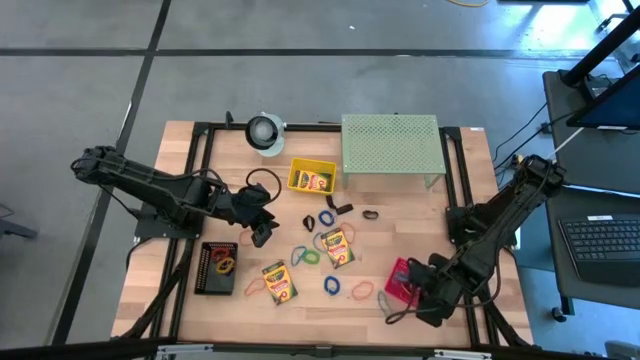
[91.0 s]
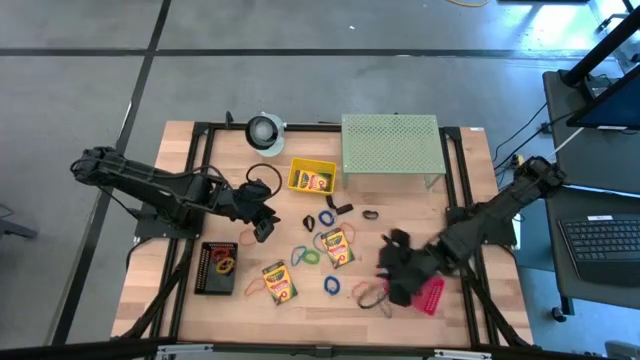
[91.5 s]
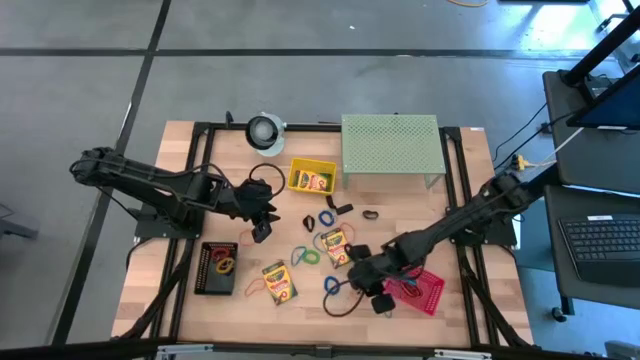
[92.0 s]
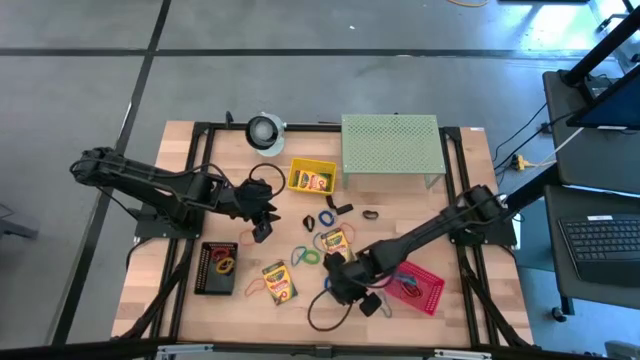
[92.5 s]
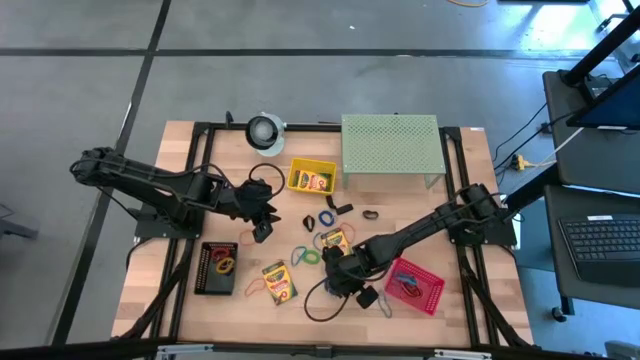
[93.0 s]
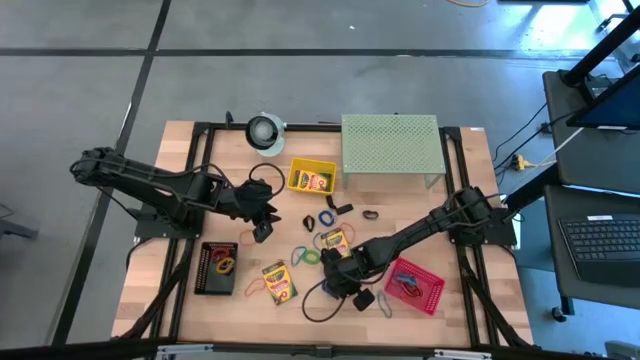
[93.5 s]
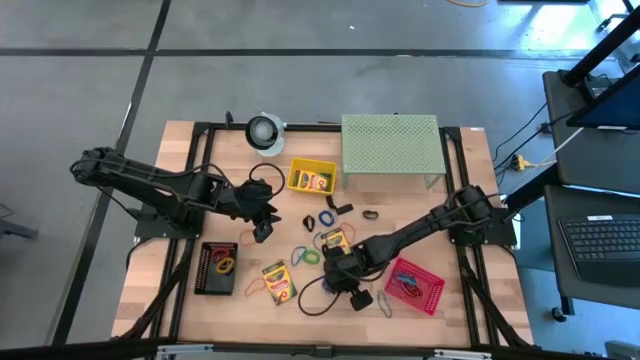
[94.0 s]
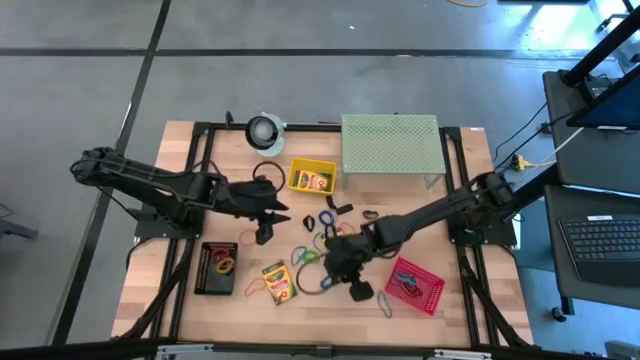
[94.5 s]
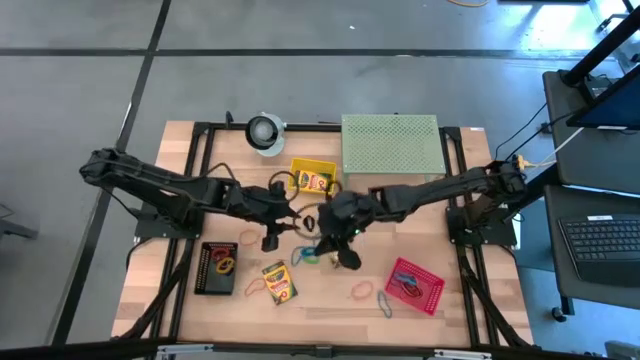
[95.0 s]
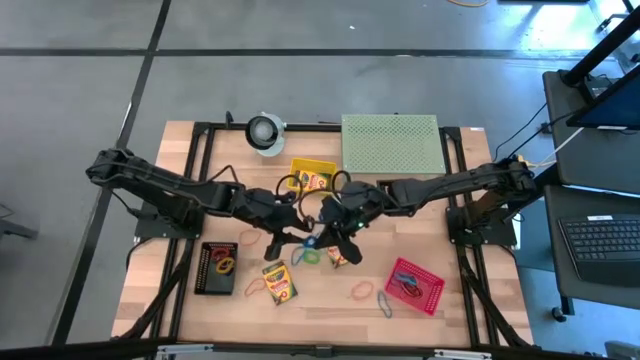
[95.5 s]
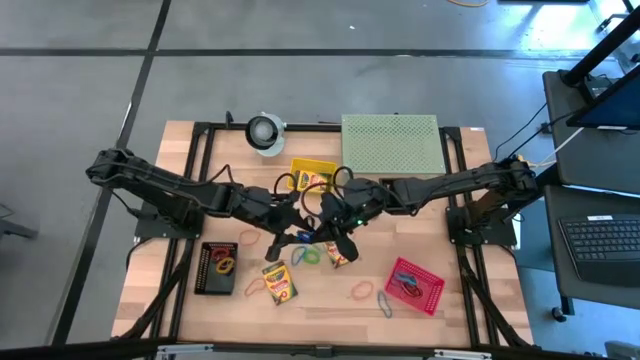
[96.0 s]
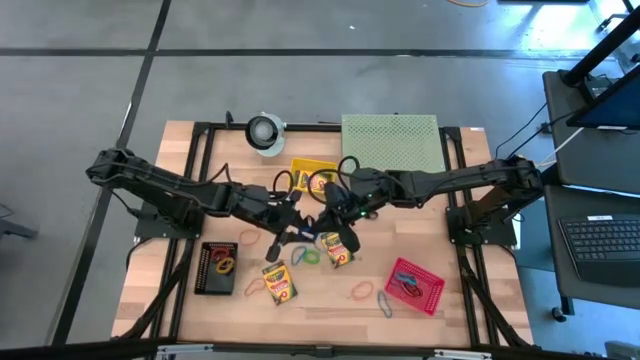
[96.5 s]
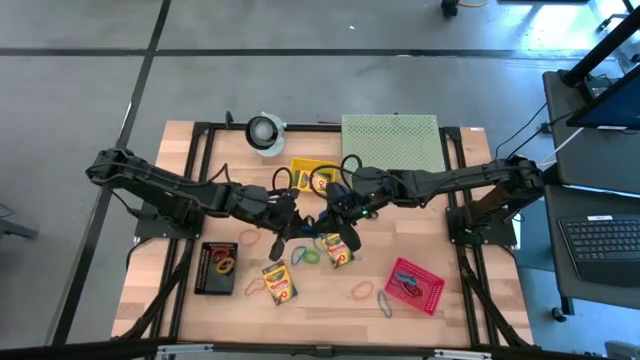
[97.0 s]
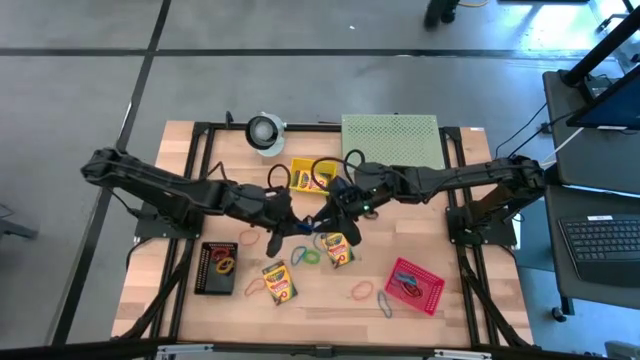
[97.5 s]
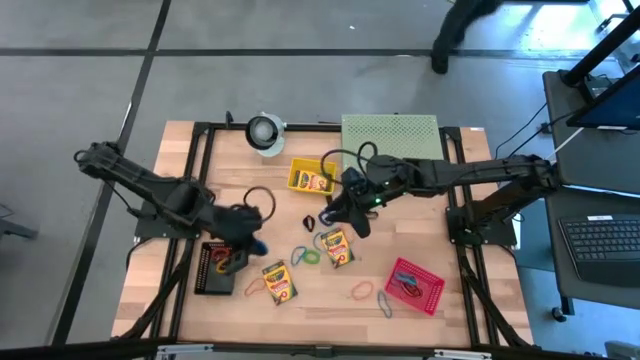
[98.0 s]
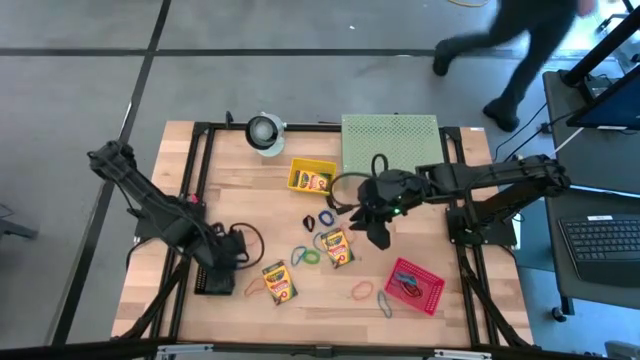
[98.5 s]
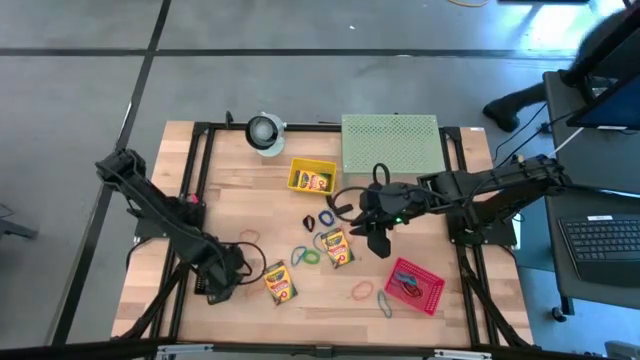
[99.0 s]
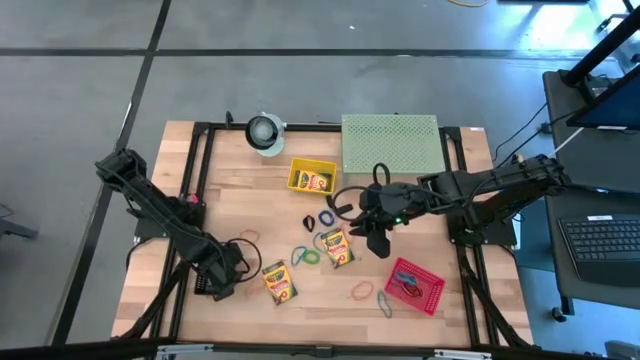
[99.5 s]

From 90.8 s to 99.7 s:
Task: Pick & Place Office Desk Supplies
Put the blue spring keychain into the black bin

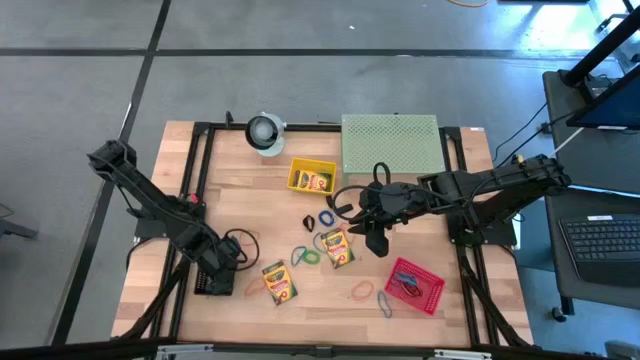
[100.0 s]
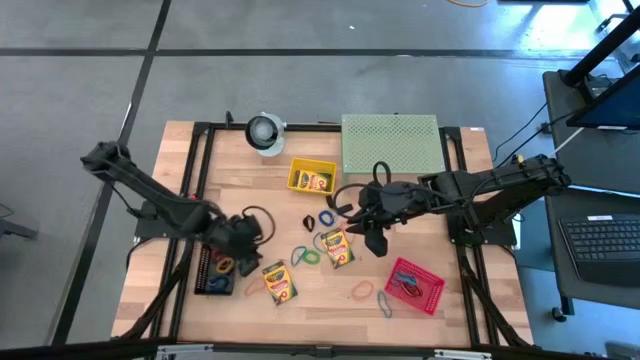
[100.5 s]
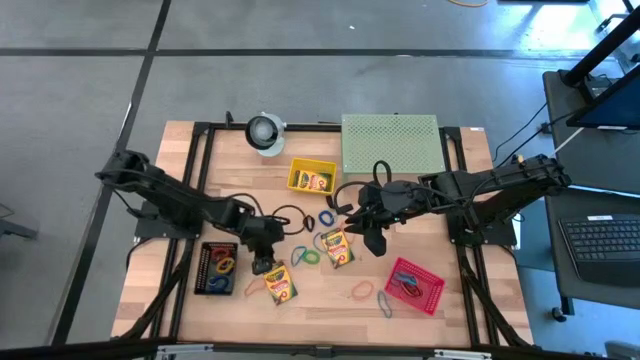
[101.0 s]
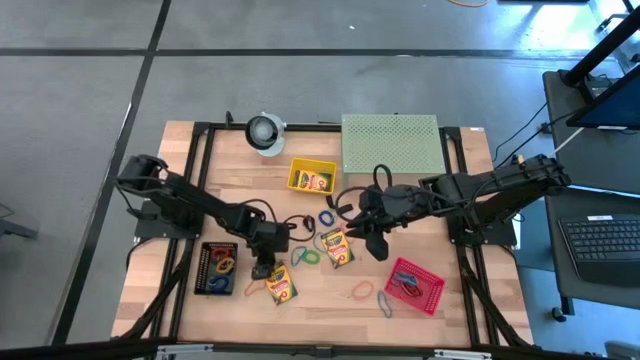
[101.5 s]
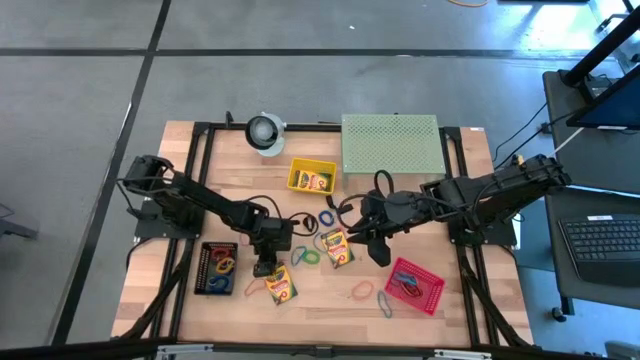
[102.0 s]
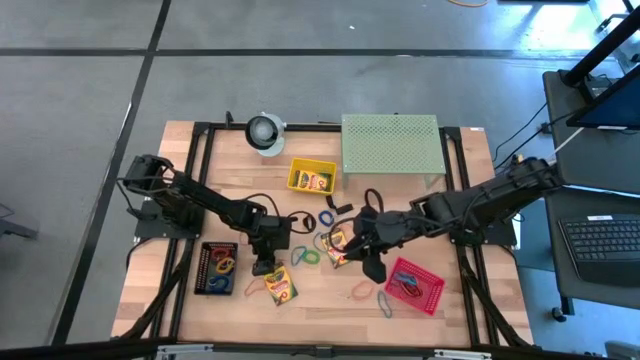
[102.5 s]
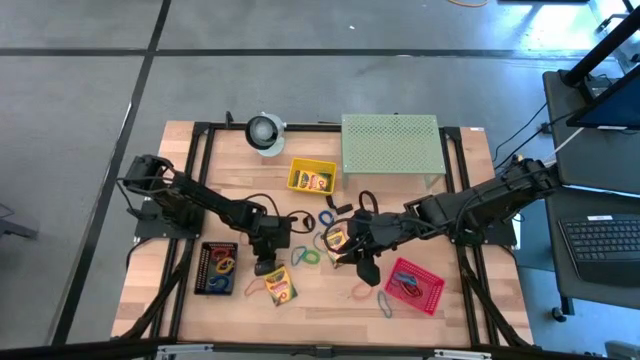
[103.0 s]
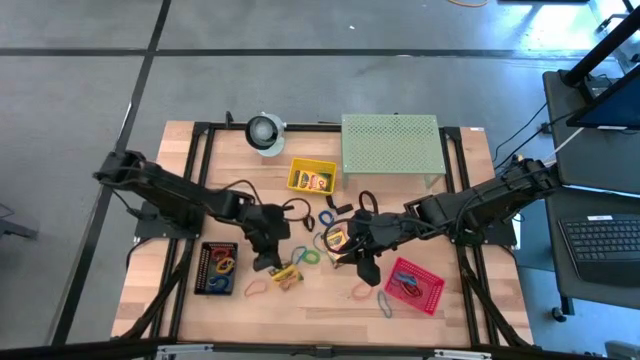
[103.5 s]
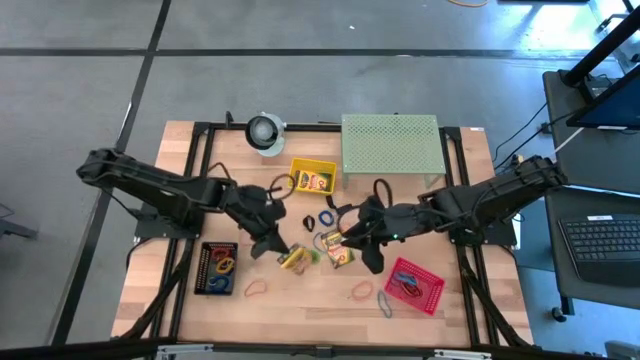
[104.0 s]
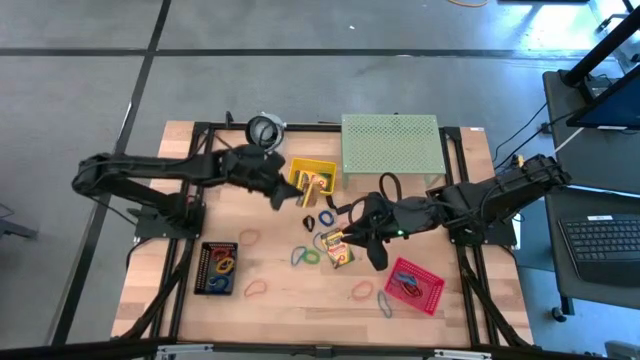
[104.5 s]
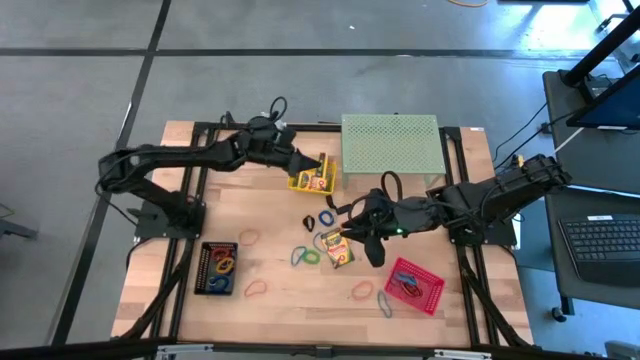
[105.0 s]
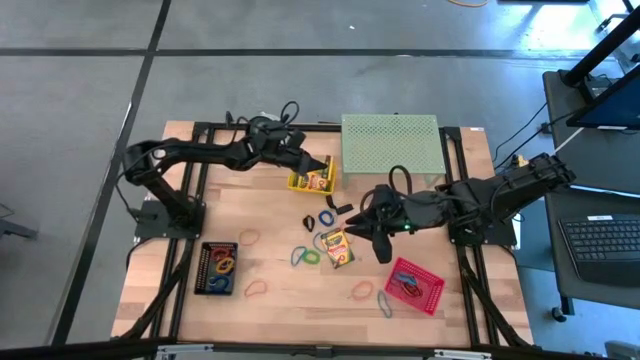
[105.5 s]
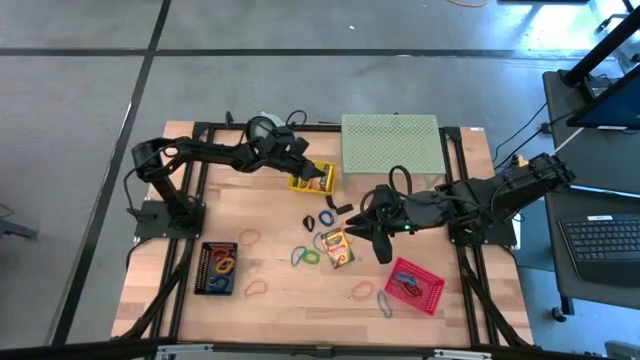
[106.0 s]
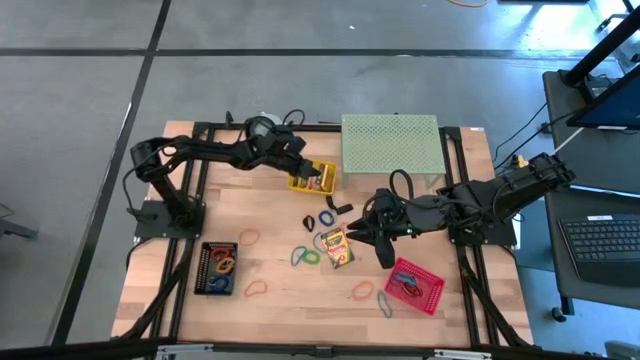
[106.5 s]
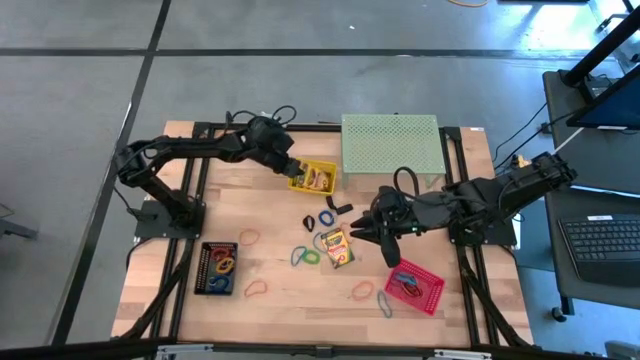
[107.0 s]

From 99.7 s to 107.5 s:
Put the crayon box into the yellow bin

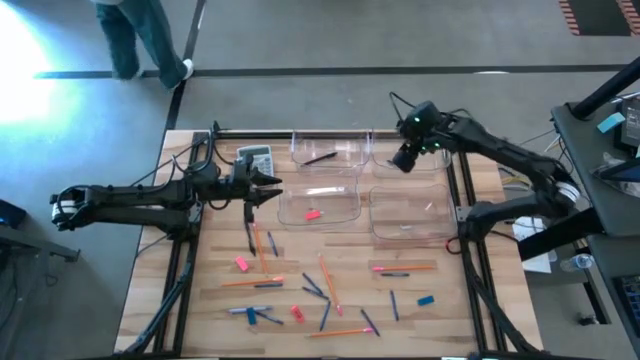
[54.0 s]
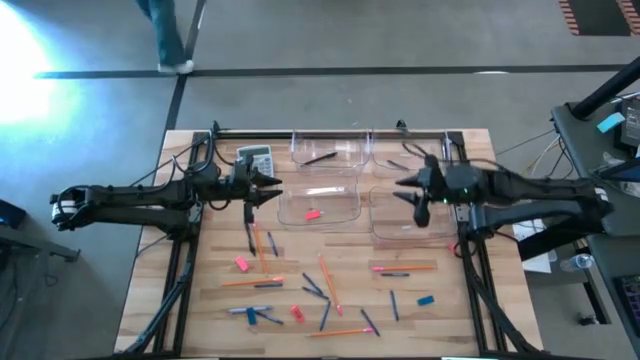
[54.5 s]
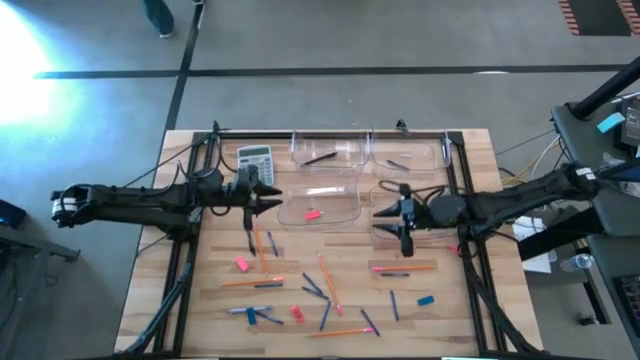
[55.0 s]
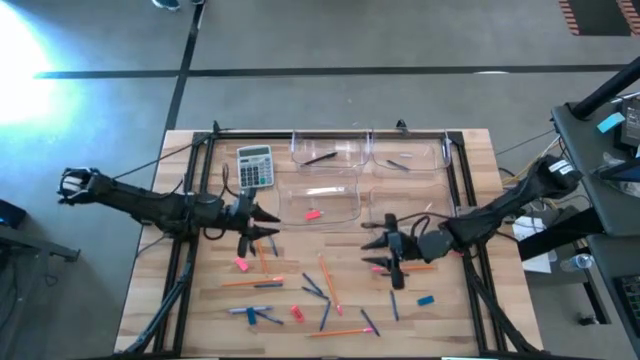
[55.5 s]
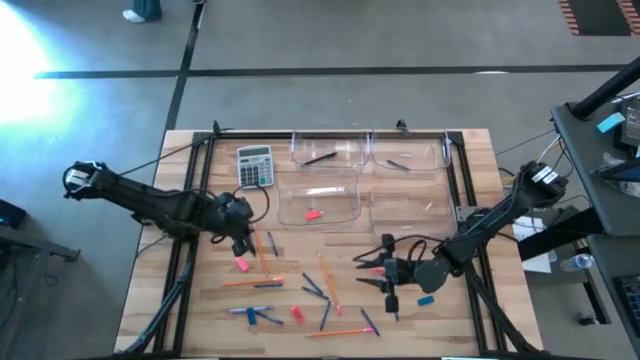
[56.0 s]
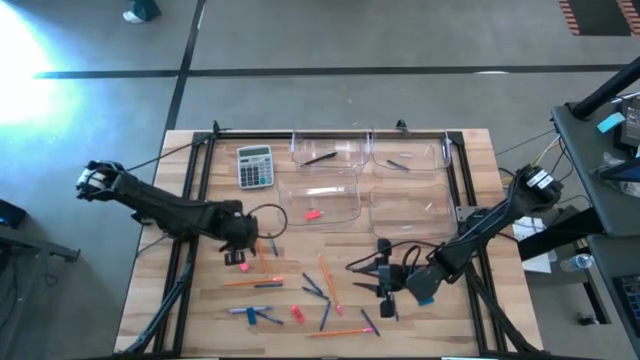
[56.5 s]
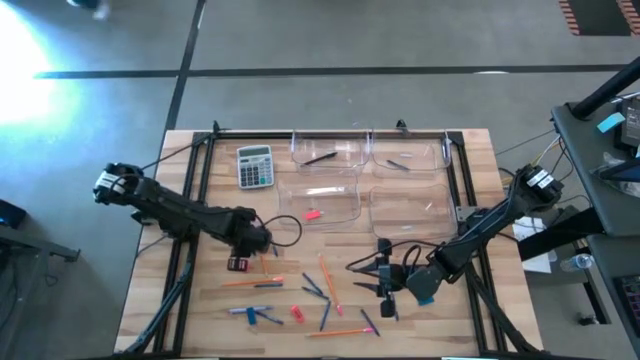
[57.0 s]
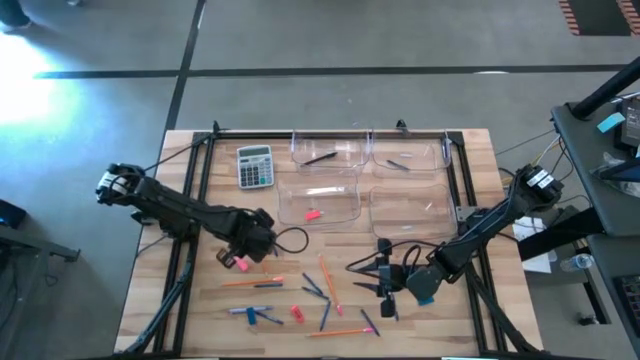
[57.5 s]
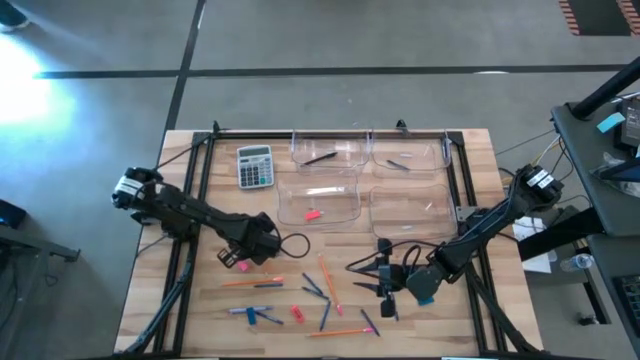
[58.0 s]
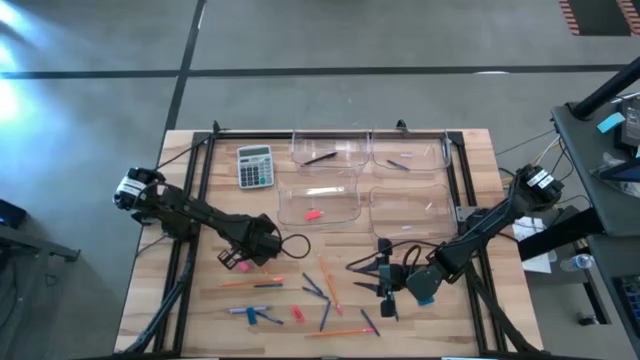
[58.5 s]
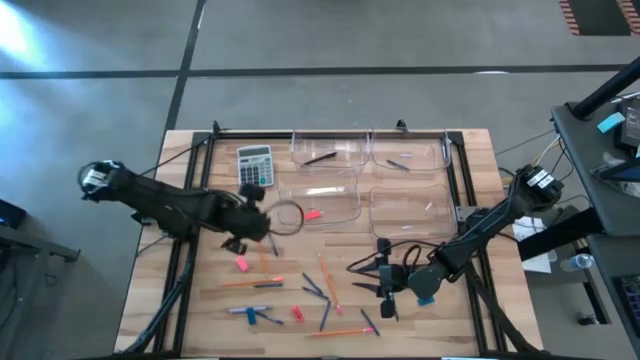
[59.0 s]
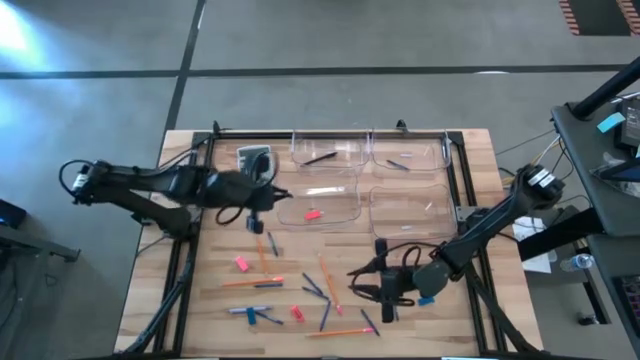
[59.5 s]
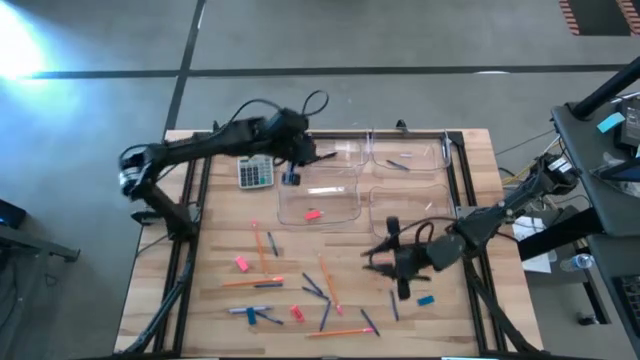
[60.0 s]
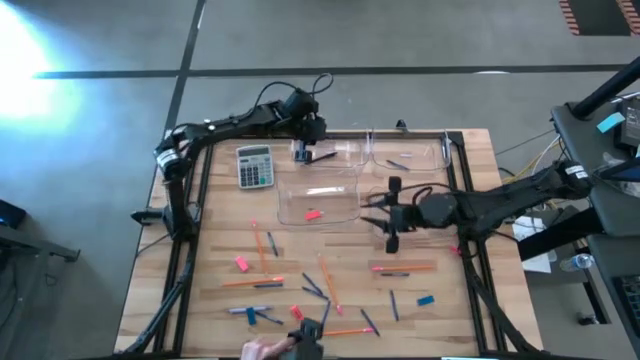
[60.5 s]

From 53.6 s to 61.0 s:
Task: Sort crayons/erasers/pens/pencils in bins
Put the black pen into the top left transparent bin
